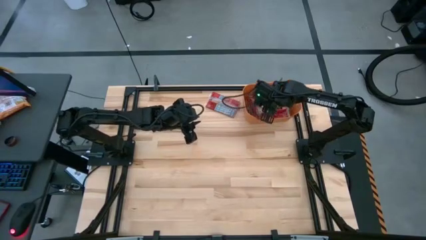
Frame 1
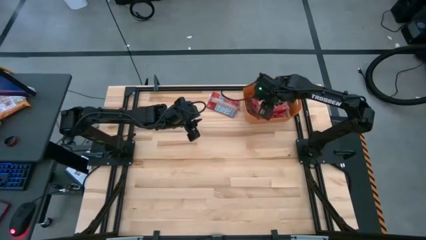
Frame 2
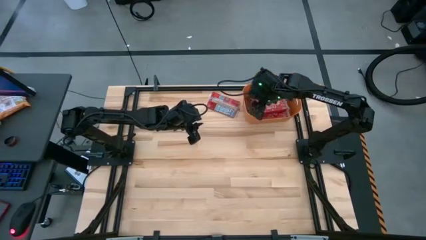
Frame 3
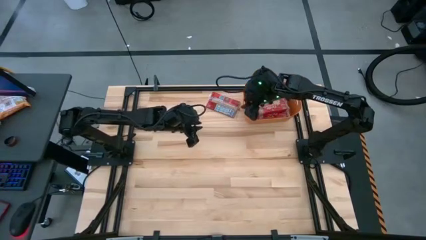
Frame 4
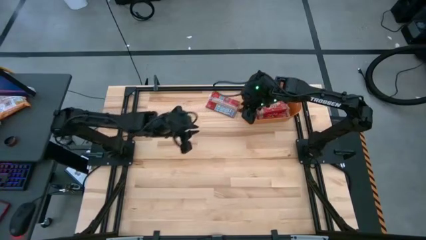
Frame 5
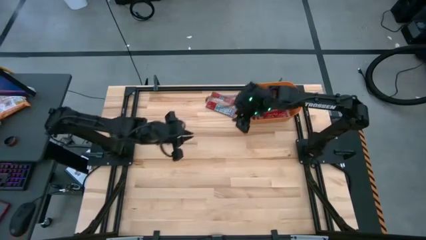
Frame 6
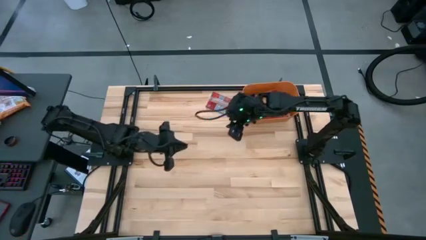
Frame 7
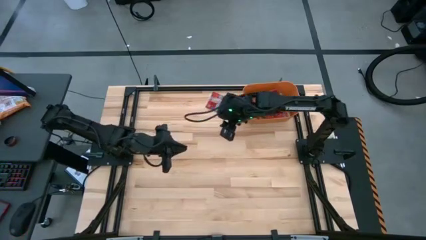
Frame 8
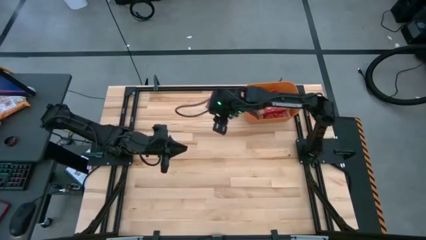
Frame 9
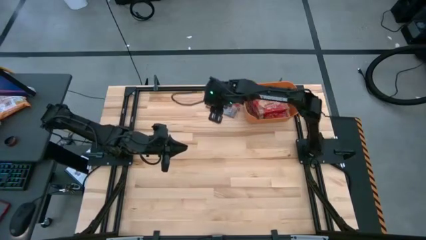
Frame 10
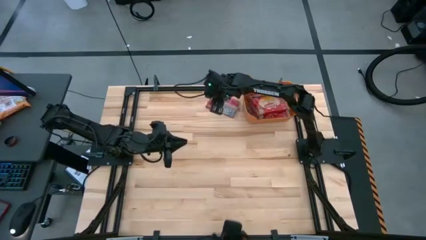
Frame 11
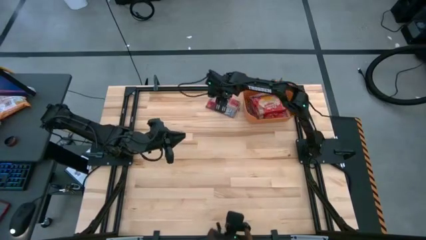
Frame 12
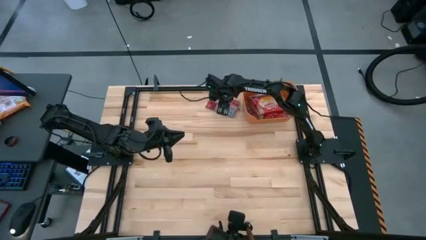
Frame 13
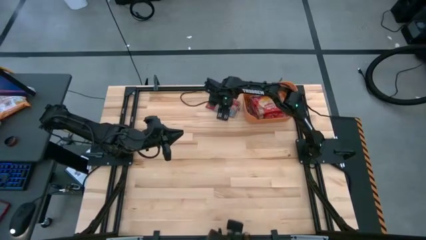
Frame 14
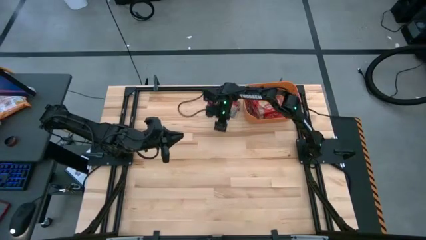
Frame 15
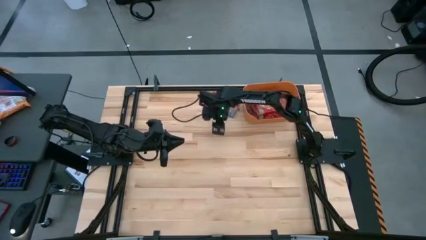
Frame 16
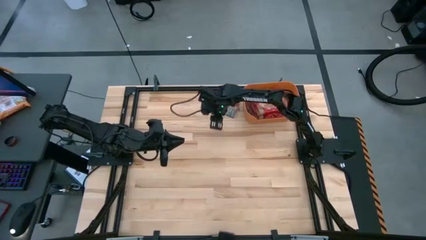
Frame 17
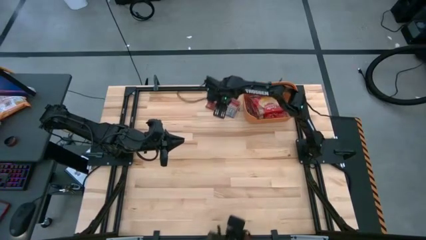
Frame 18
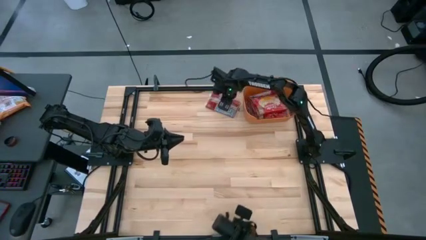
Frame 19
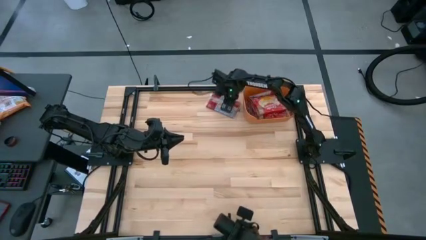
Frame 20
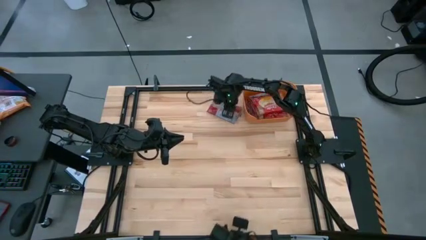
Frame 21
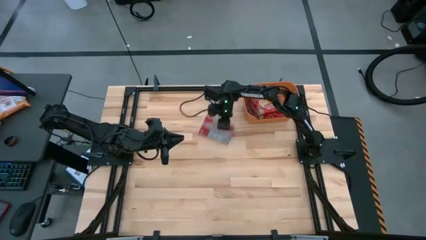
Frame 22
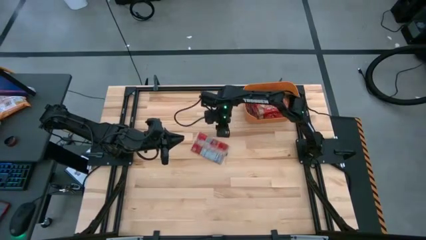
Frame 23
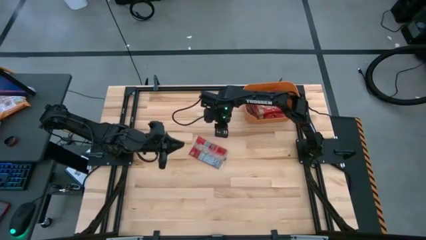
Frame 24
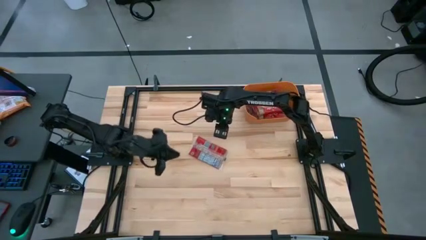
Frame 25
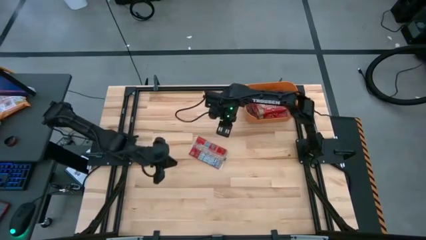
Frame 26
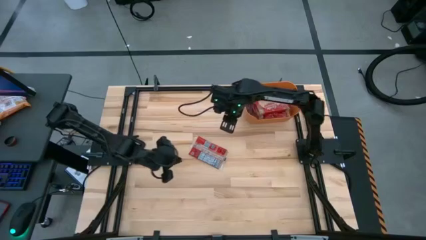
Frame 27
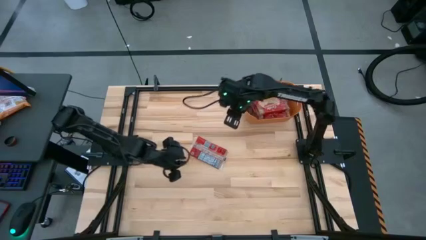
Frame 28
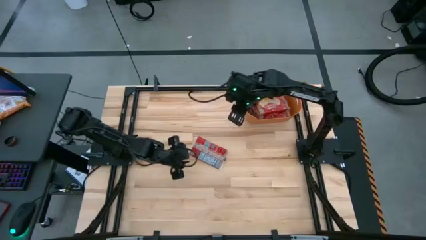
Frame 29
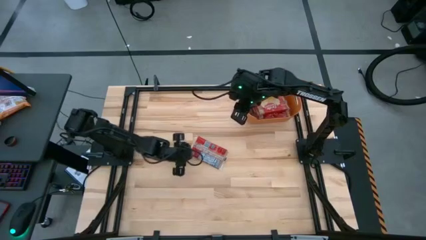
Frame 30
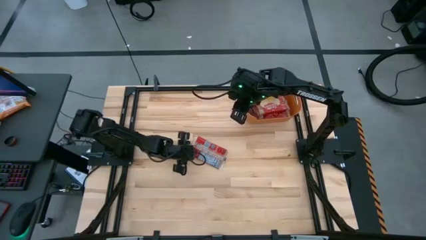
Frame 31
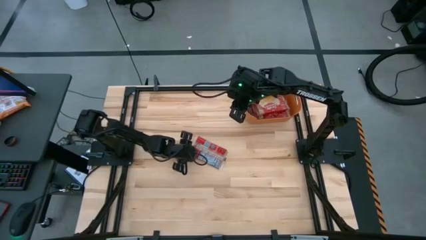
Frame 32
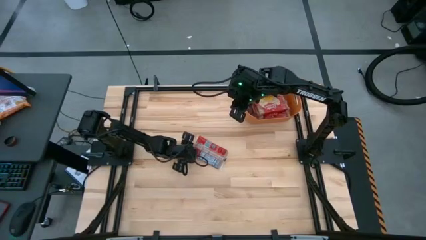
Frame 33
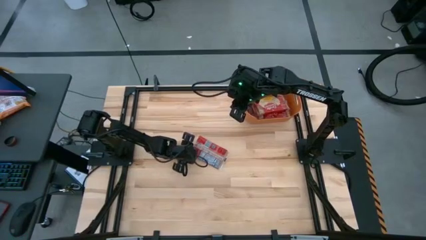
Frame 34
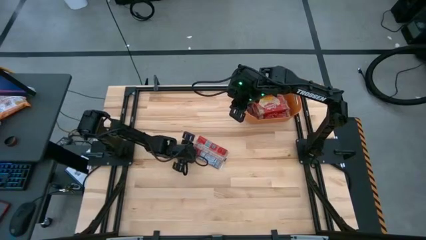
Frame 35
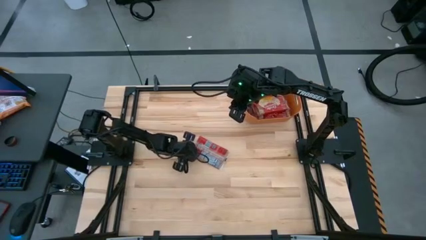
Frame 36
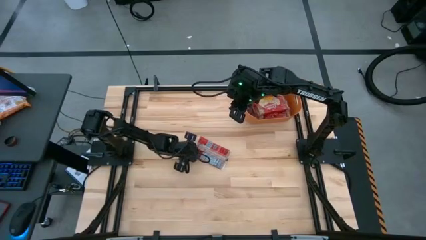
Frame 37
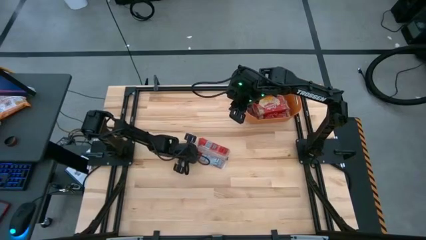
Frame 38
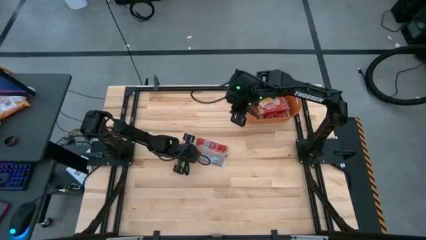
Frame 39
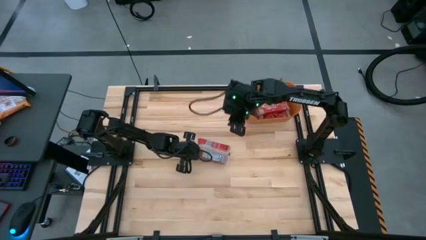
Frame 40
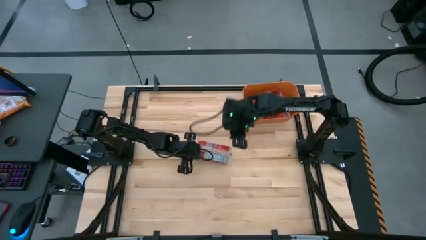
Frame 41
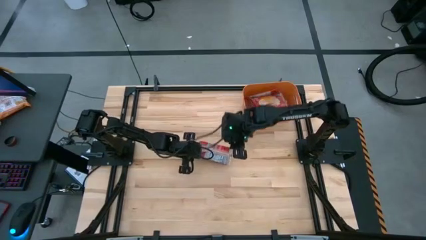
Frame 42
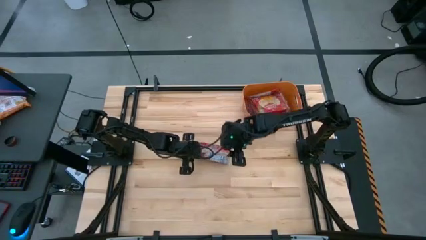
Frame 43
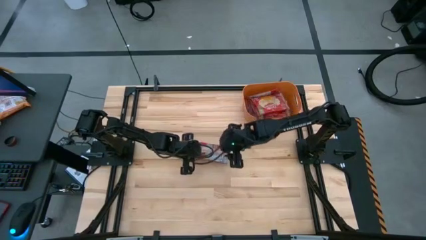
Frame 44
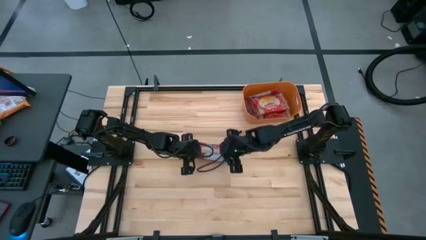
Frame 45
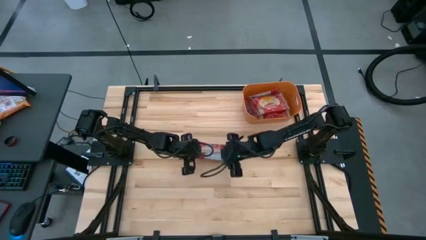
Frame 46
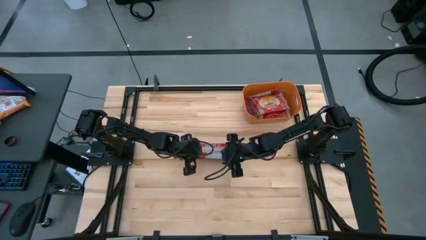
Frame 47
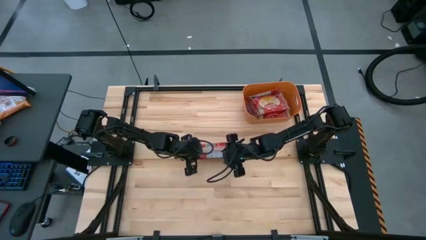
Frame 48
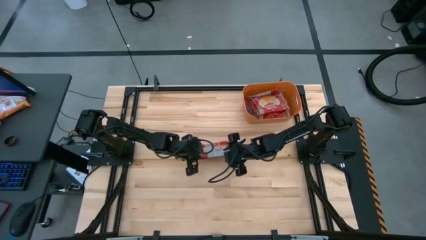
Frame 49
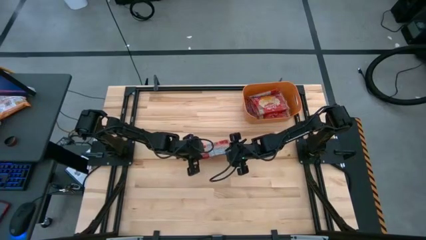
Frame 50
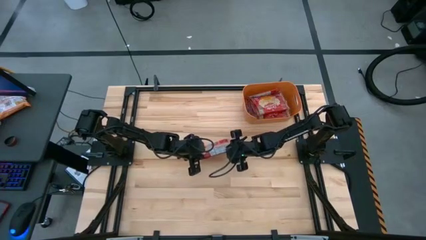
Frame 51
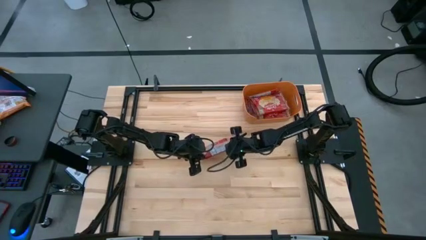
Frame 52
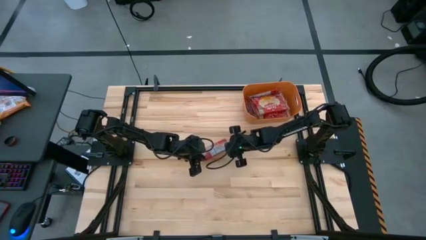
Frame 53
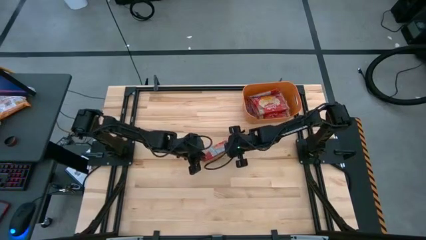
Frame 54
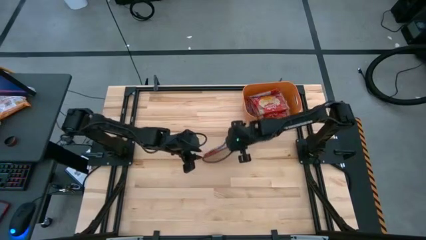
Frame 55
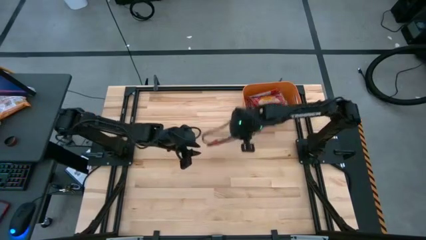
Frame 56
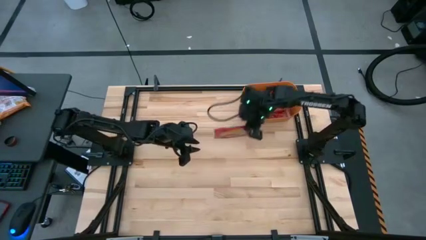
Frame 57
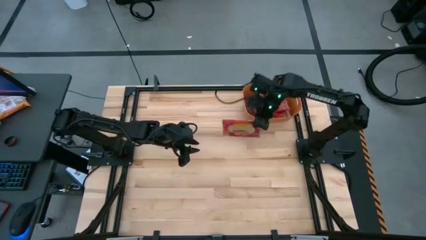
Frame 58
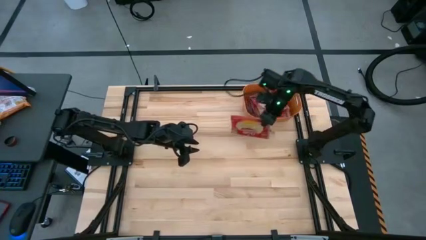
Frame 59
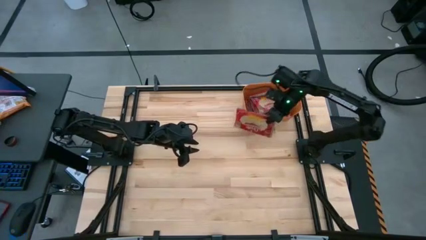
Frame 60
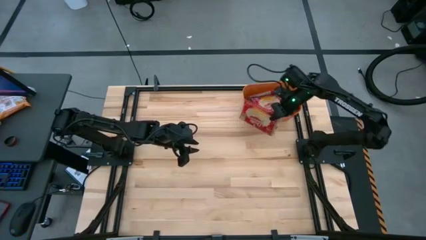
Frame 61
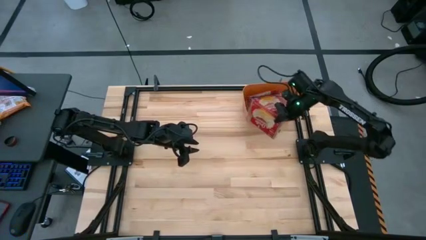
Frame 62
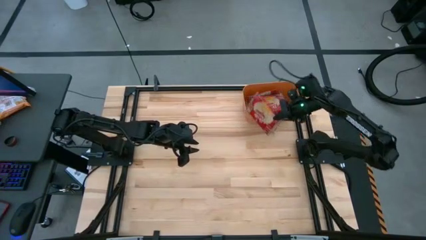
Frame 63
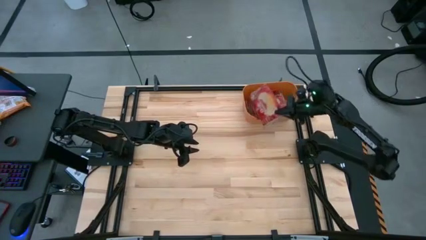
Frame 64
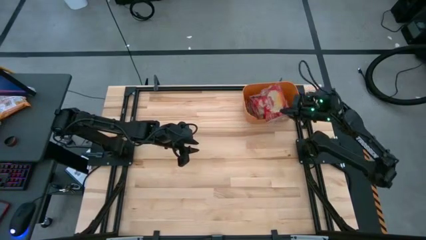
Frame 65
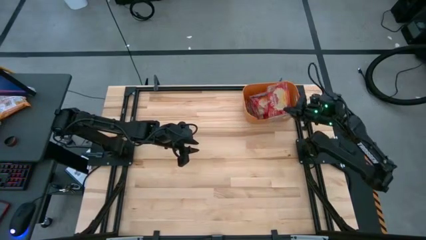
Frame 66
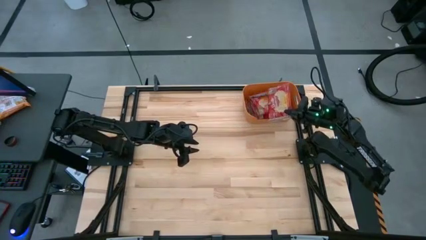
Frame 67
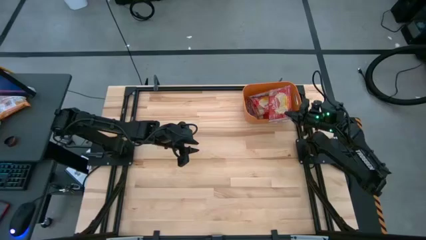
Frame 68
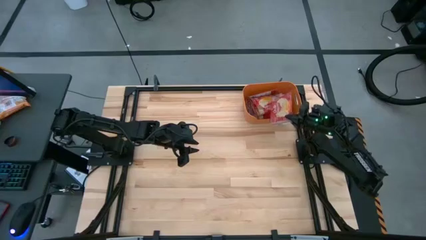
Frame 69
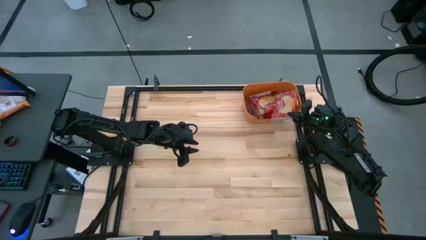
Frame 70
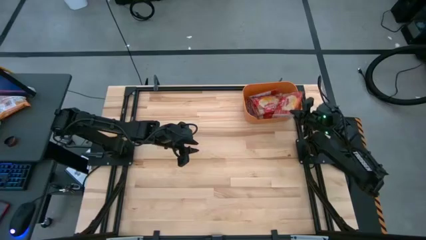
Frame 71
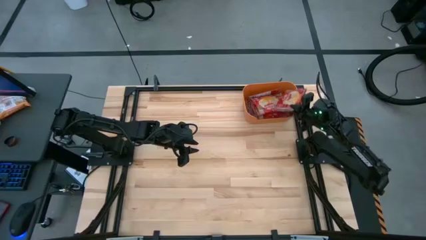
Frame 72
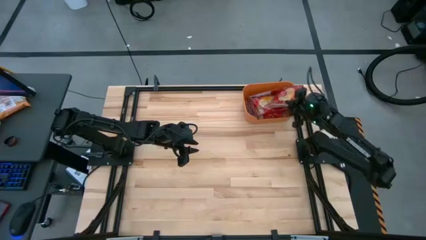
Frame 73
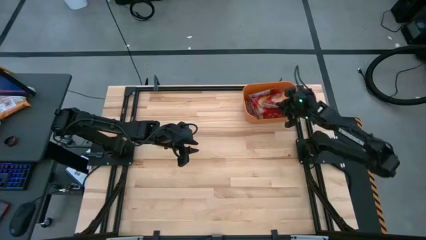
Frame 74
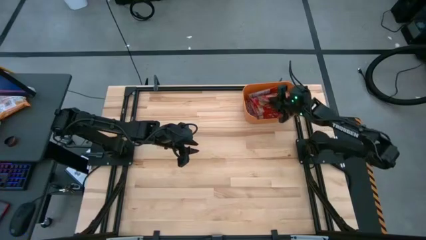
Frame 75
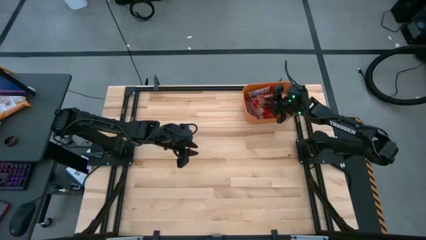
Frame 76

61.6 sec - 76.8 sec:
Task: Sort popcorn bags into baskets
Put the red popcorn bag into the orange bin
